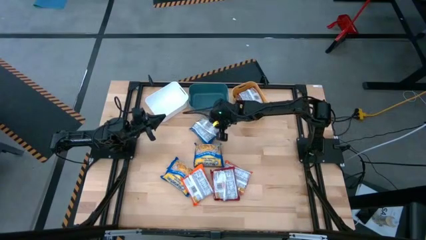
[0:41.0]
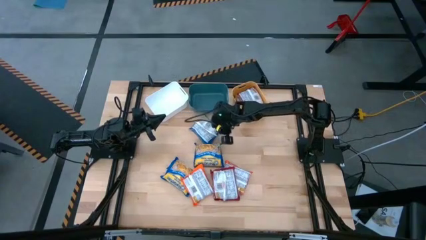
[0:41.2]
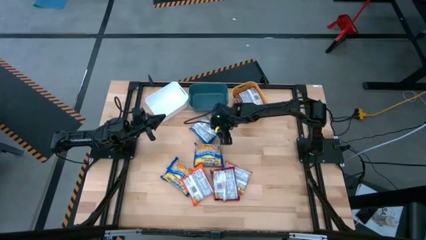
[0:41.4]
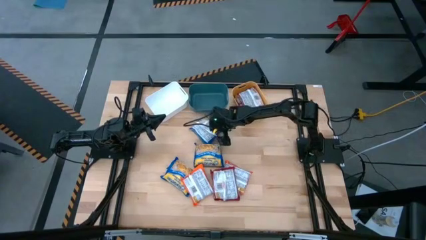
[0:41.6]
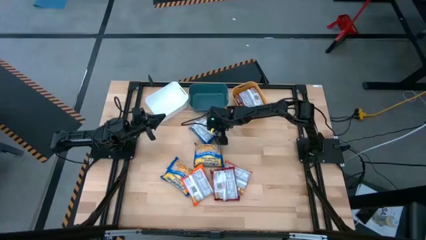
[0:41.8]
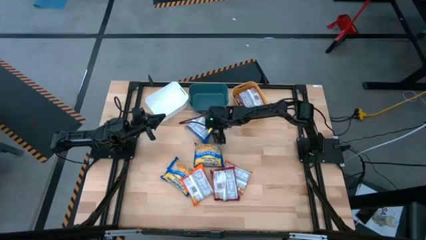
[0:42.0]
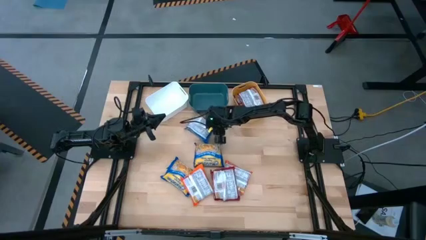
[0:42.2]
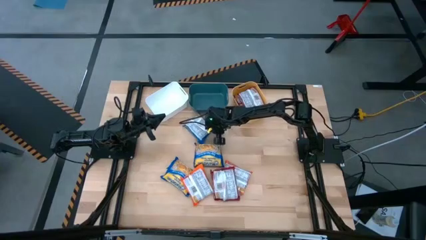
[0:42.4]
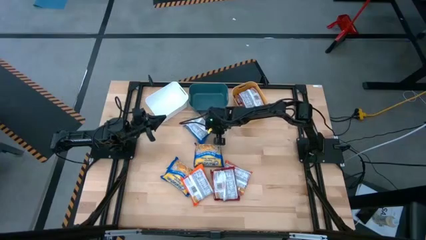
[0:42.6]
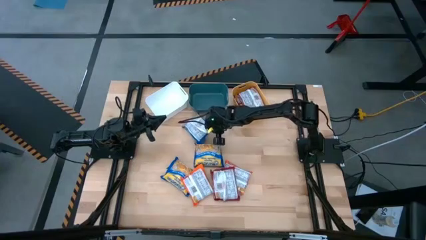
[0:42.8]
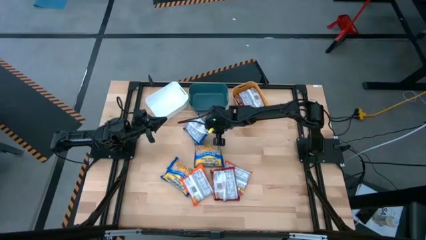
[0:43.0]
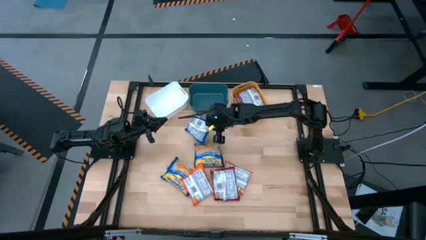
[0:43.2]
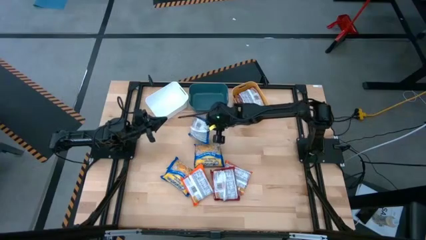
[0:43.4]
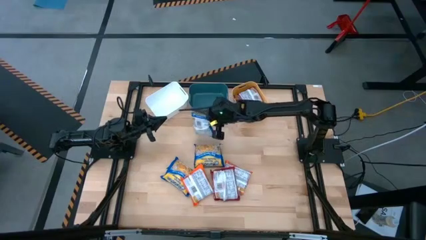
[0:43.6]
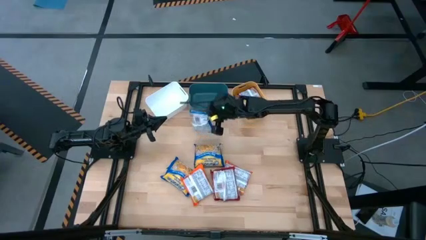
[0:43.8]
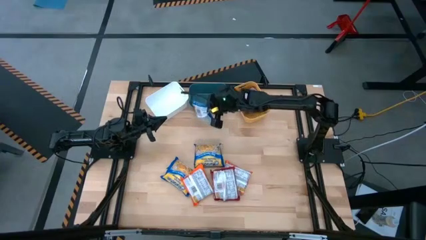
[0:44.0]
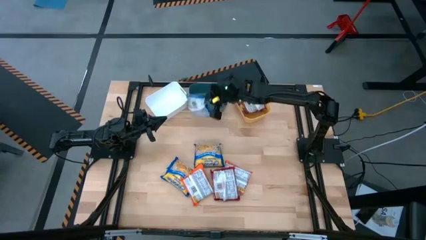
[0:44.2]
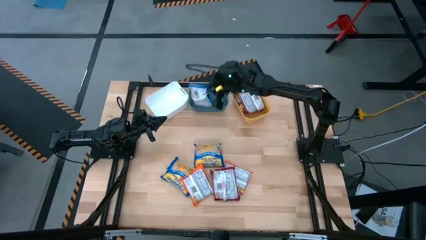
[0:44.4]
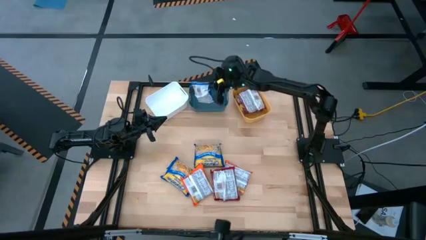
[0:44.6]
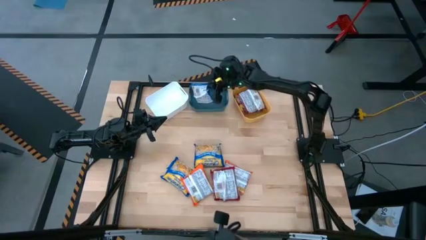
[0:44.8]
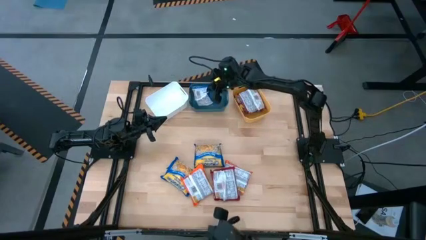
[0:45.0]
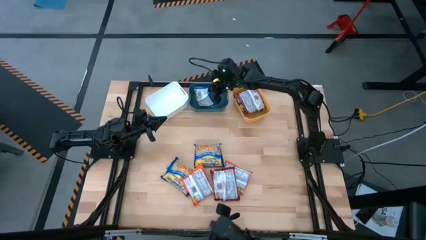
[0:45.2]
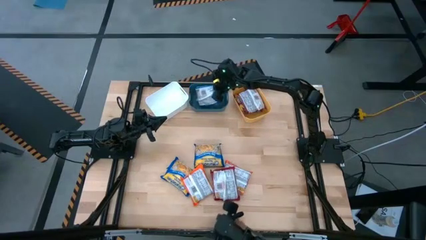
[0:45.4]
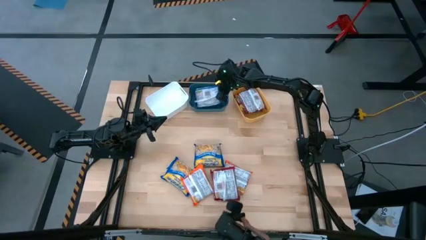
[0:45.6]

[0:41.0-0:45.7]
Task: Sort Maruchan noodles
Put the top blue noodle pack into the blue bin

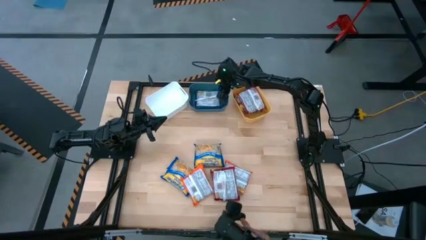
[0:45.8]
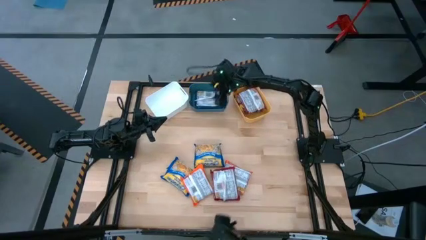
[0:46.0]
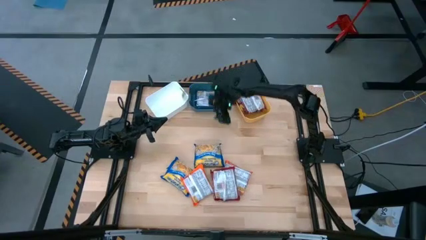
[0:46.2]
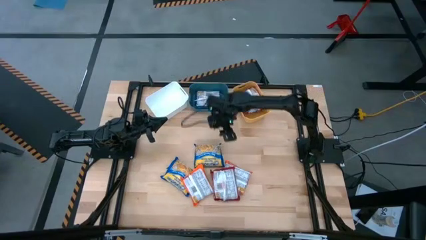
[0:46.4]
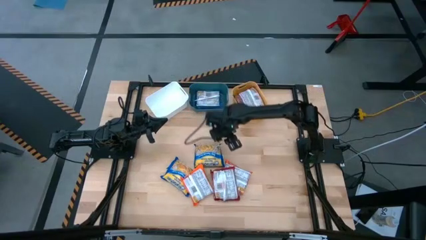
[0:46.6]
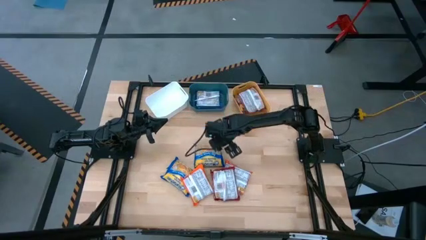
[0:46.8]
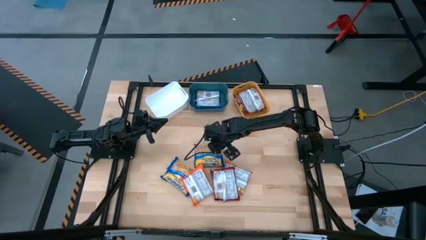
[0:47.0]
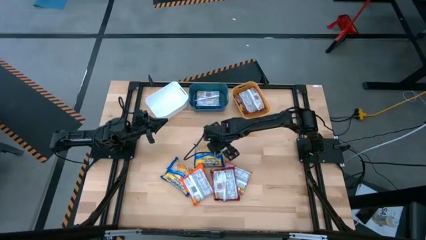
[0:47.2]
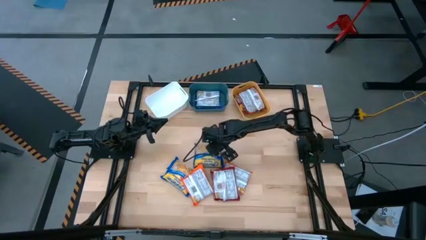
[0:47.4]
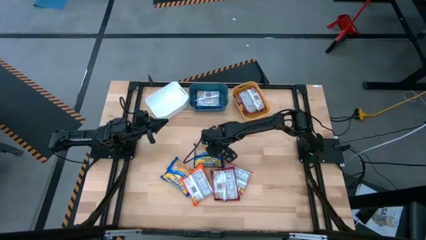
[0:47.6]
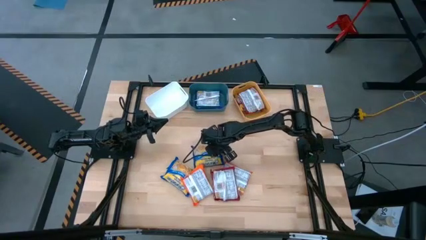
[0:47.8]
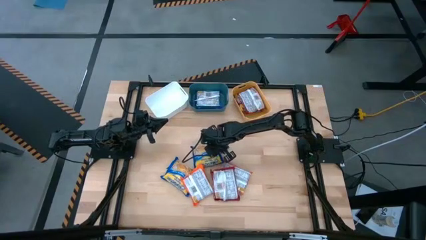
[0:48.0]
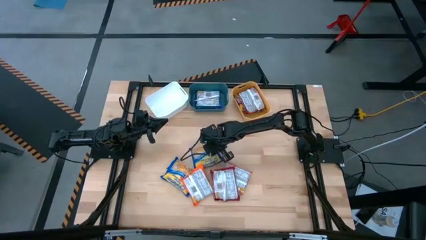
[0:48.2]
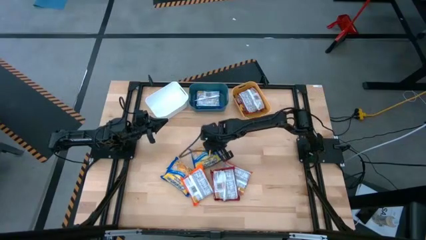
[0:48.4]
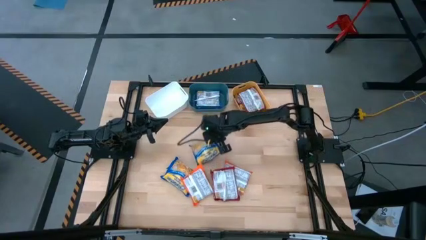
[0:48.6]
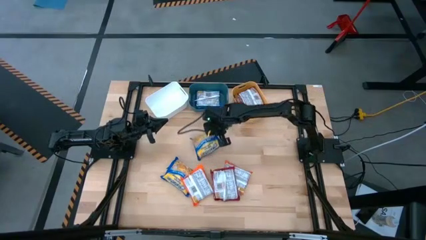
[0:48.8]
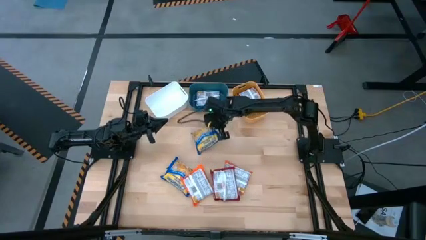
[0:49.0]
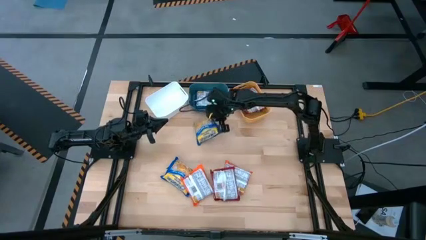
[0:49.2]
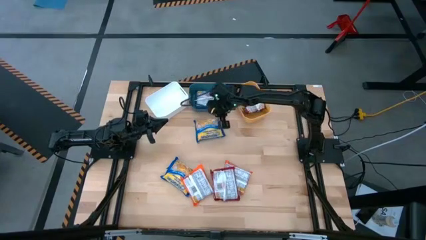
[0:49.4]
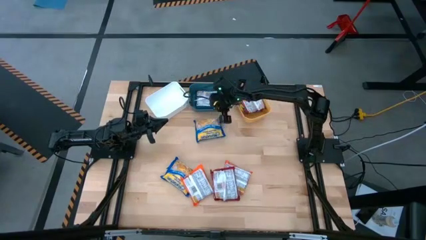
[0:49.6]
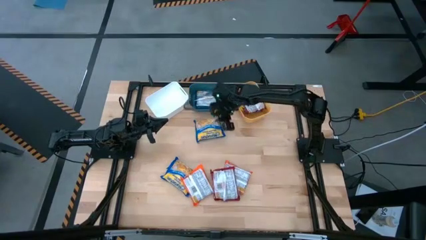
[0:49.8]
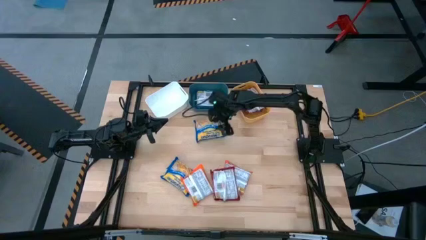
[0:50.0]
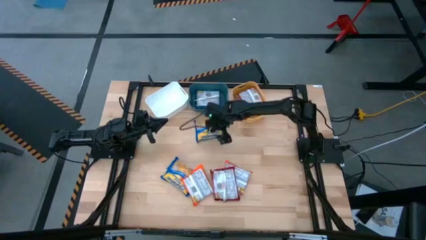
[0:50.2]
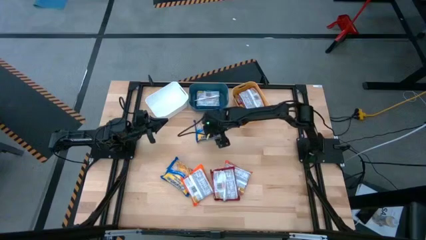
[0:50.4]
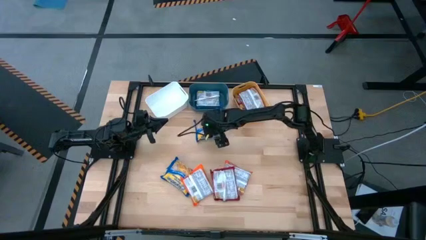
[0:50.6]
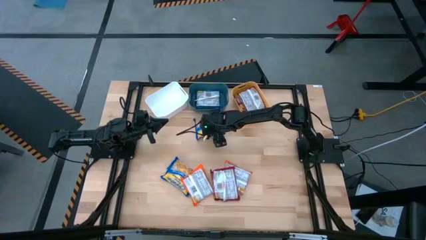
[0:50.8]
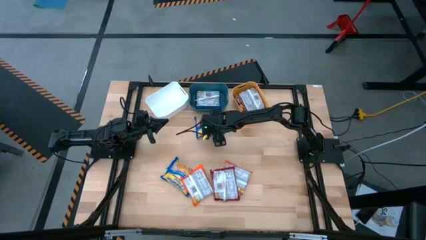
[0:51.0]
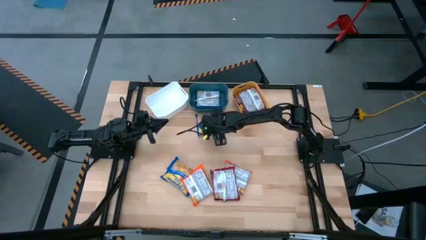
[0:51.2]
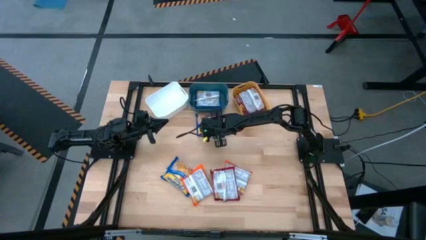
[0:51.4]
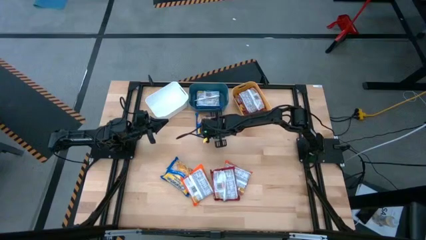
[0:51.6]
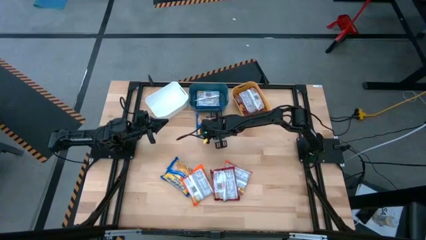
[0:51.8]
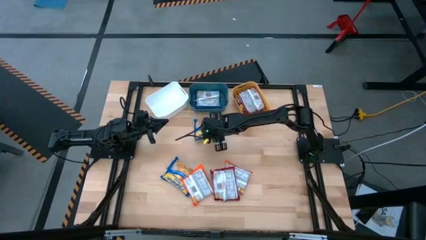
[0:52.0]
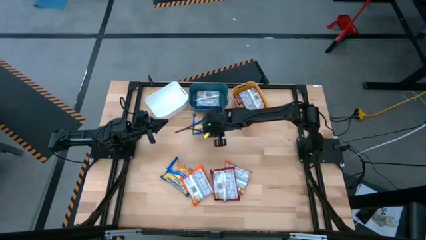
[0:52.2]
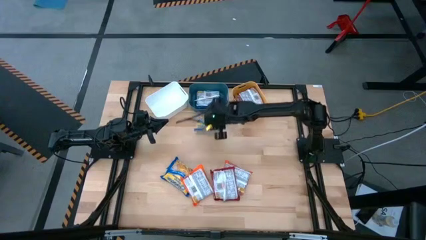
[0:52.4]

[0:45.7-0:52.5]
Put the top blue noodle pack into the blue bin

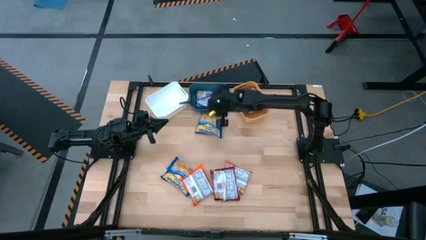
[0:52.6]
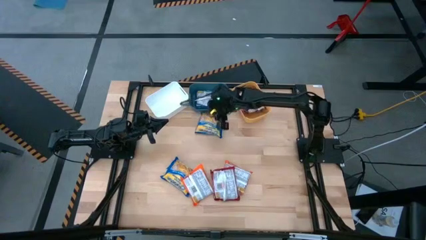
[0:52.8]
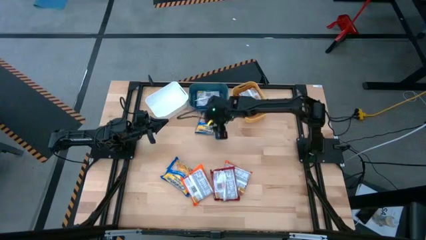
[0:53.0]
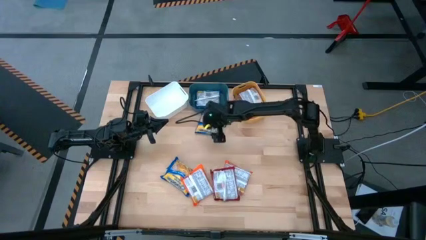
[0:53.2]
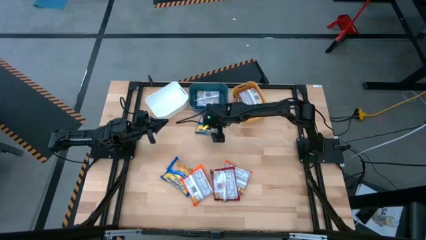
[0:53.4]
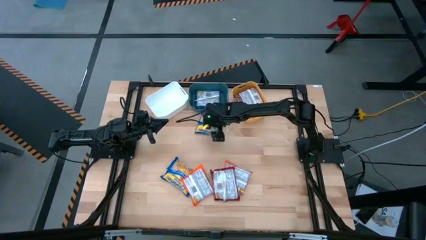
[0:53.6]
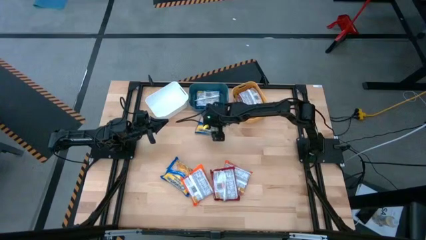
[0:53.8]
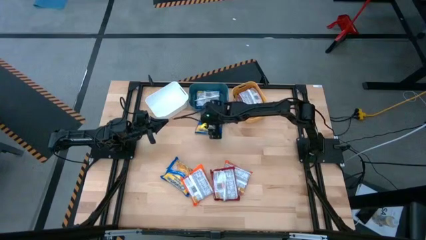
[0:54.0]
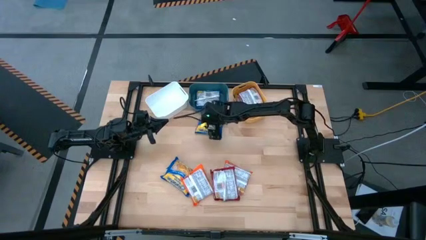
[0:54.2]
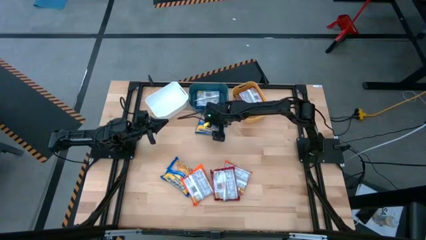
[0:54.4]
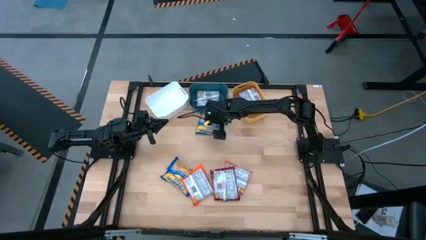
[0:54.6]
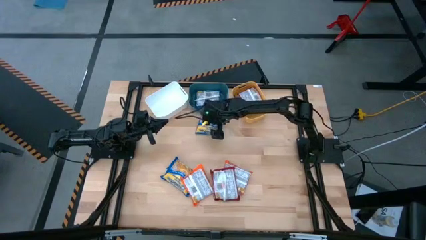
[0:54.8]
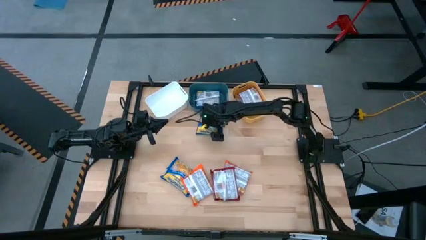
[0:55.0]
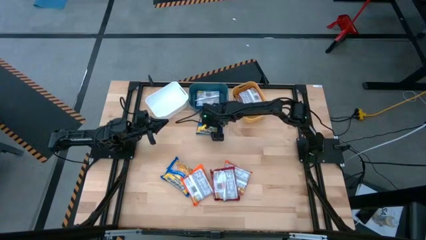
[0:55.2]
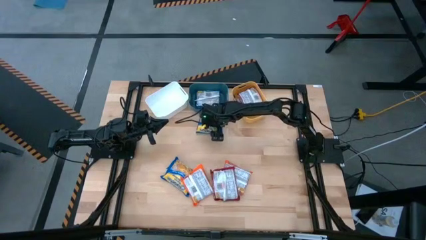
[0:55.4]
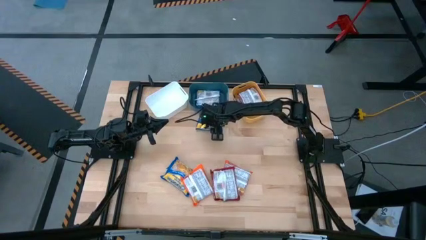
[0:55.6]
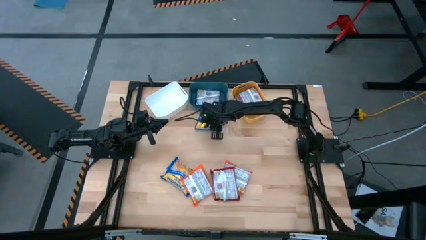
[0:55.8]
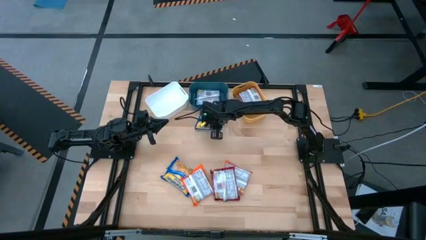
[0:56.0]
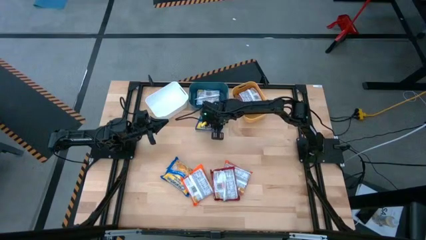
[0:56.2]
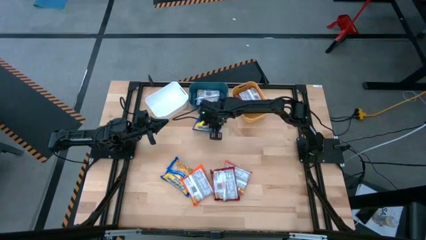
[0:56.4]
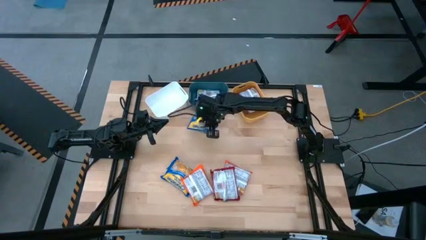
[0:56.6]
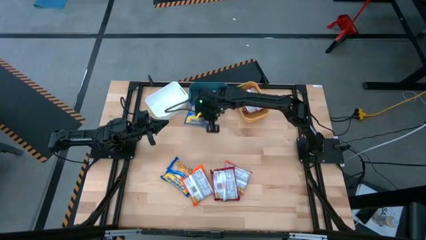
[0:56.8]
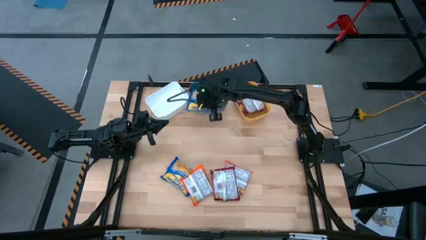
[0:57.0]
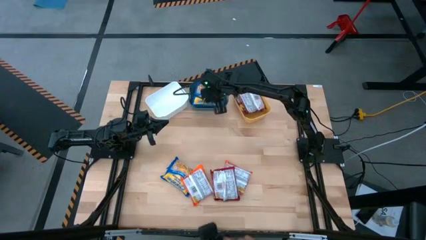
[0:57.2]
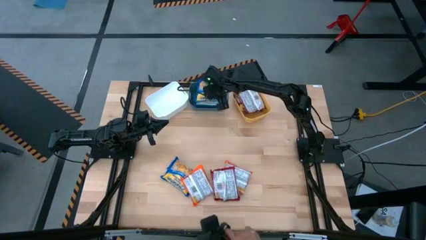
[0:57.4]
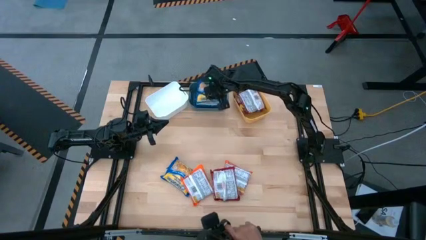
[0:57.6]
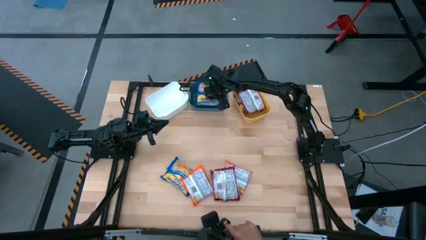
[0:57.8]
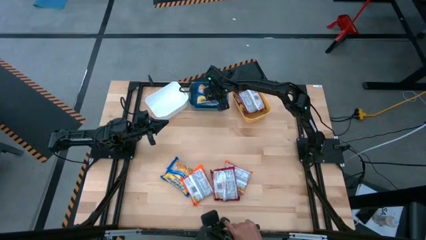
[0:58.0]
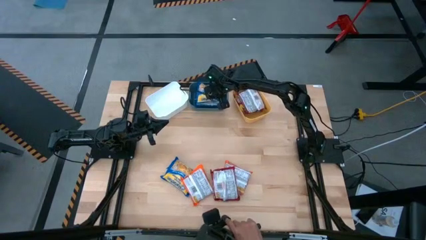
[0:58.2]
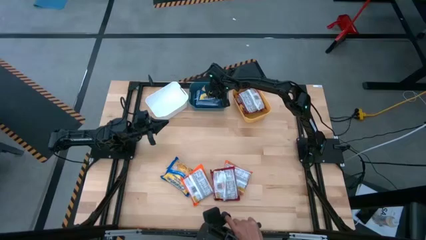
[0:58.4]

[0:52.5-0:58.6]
Put the top blue noodle pack into the blue bin
